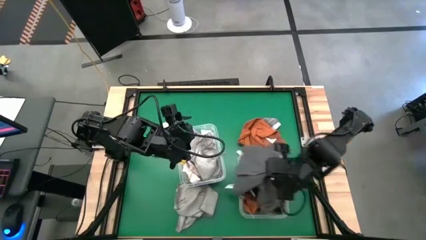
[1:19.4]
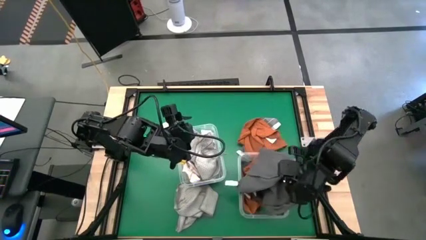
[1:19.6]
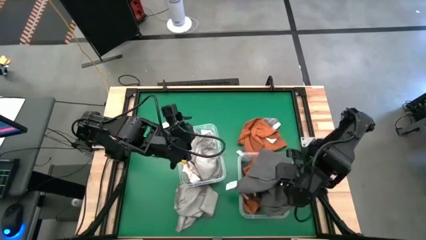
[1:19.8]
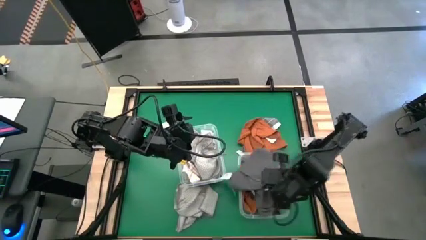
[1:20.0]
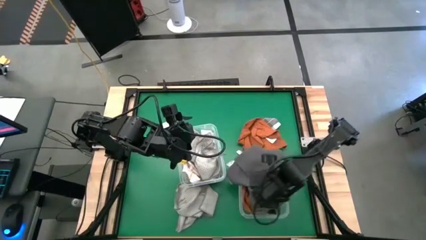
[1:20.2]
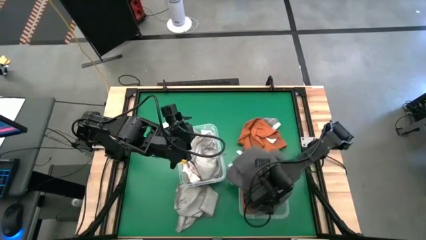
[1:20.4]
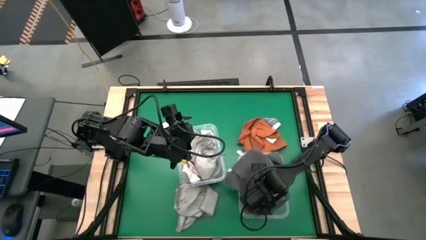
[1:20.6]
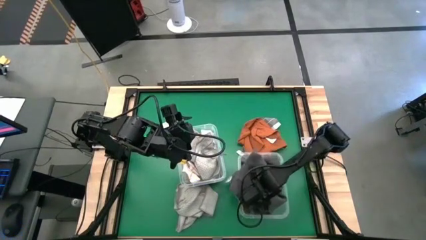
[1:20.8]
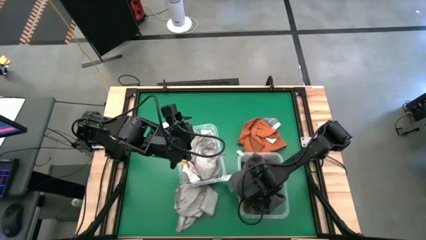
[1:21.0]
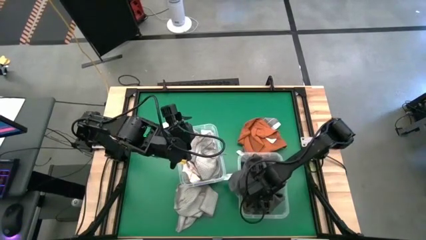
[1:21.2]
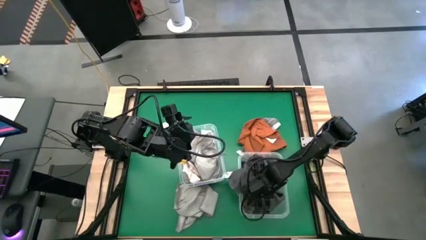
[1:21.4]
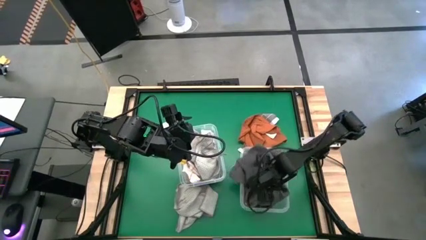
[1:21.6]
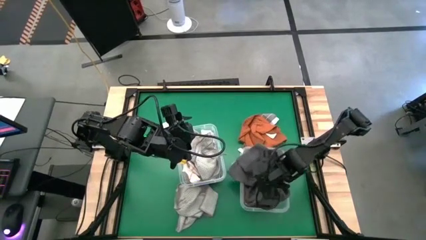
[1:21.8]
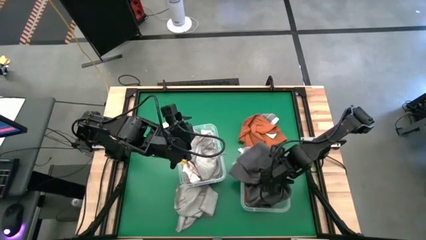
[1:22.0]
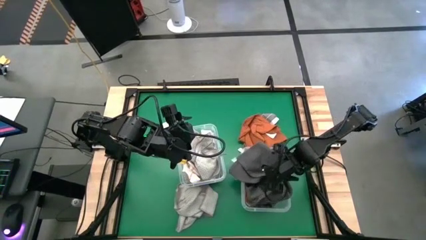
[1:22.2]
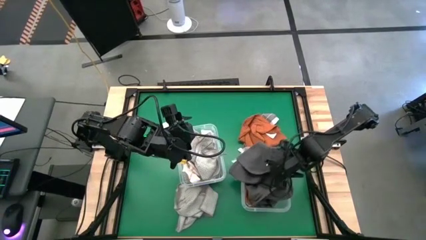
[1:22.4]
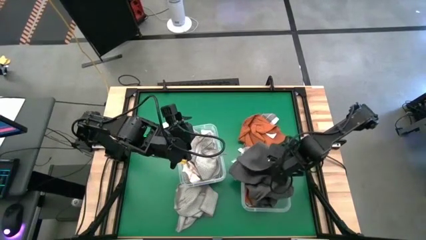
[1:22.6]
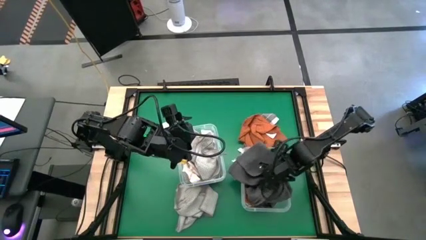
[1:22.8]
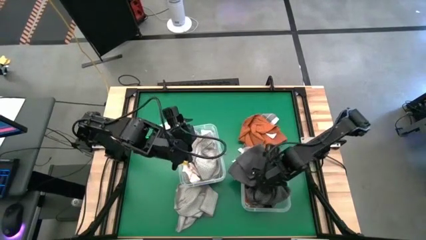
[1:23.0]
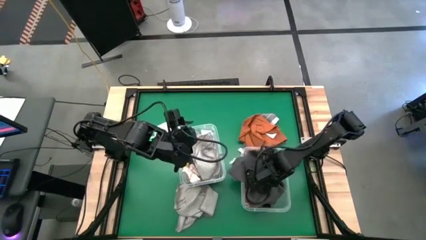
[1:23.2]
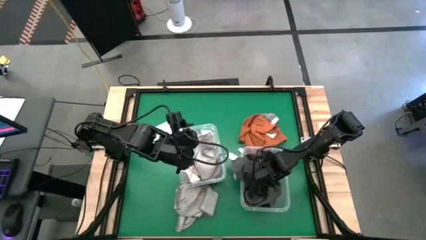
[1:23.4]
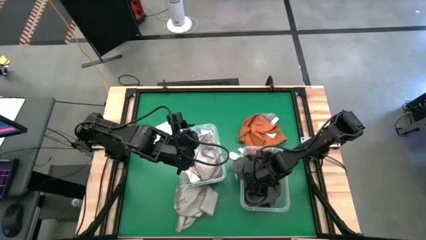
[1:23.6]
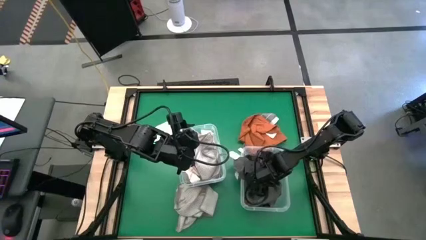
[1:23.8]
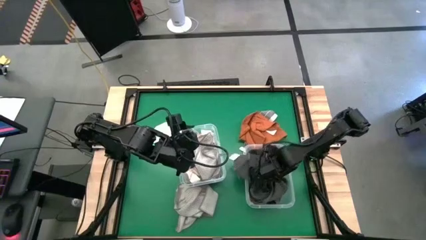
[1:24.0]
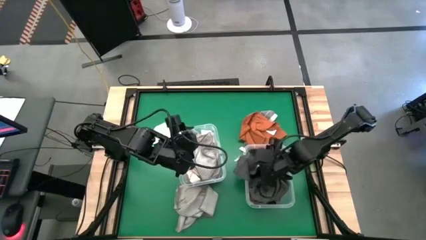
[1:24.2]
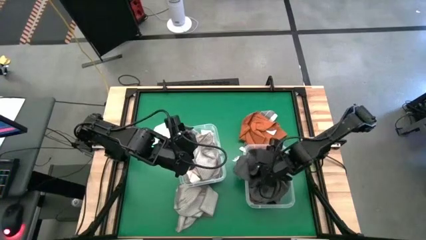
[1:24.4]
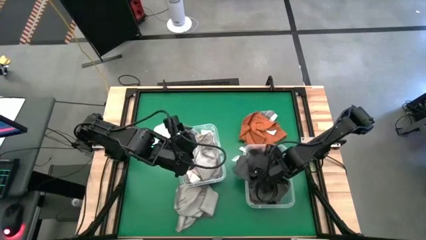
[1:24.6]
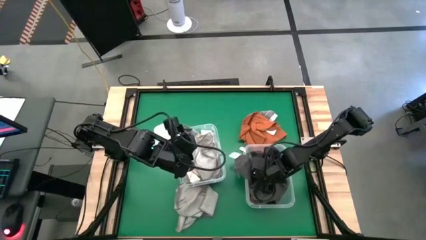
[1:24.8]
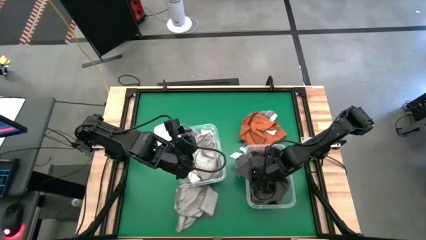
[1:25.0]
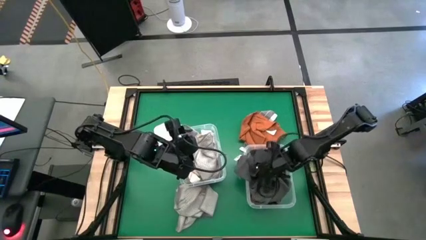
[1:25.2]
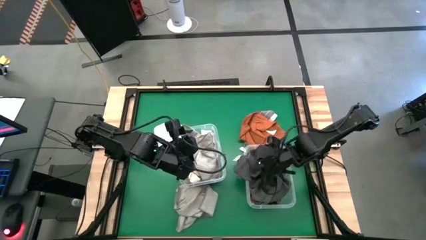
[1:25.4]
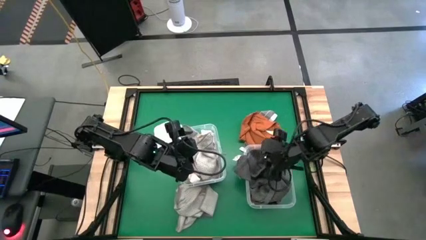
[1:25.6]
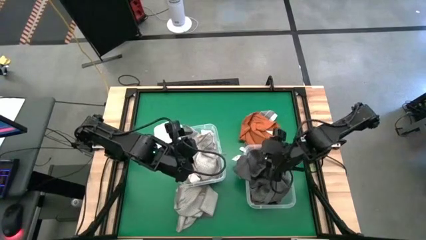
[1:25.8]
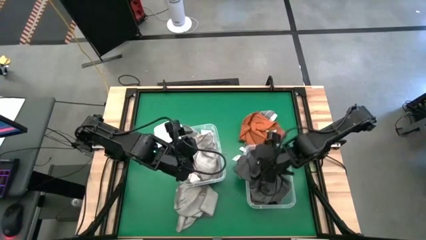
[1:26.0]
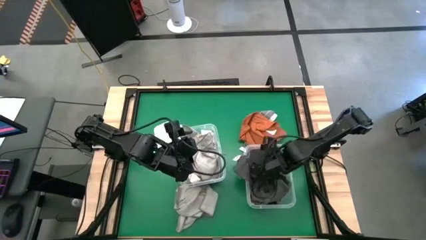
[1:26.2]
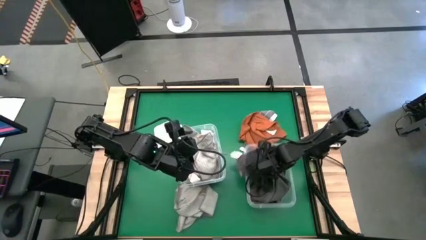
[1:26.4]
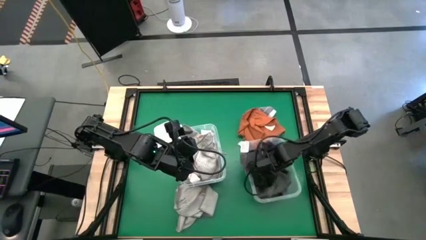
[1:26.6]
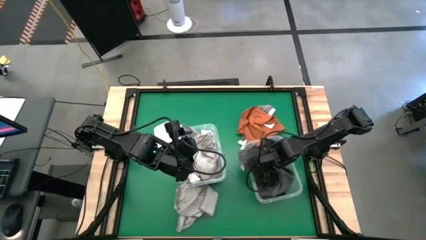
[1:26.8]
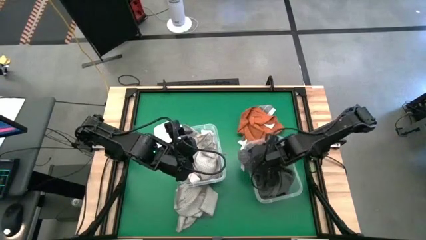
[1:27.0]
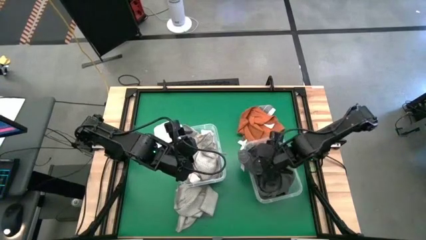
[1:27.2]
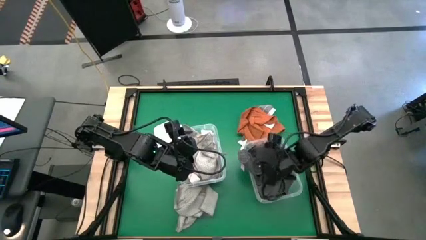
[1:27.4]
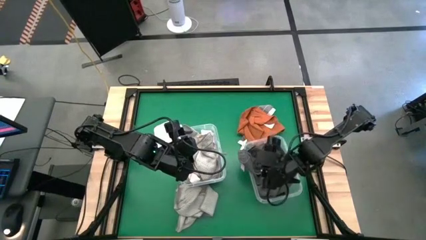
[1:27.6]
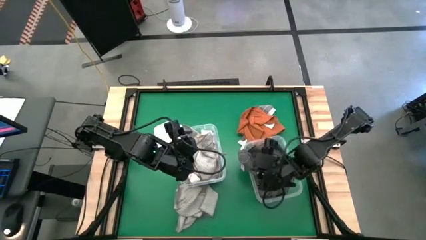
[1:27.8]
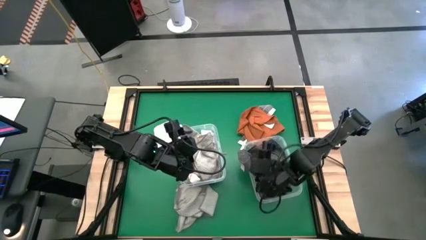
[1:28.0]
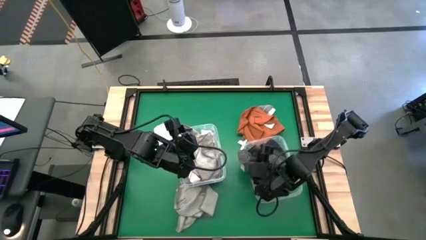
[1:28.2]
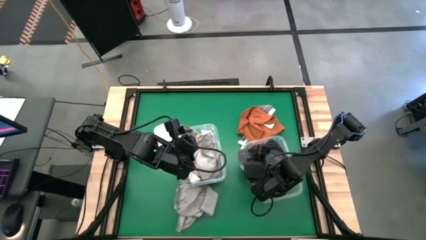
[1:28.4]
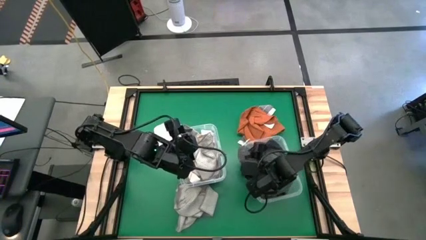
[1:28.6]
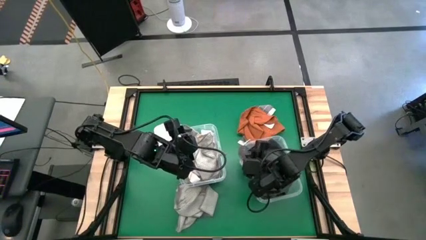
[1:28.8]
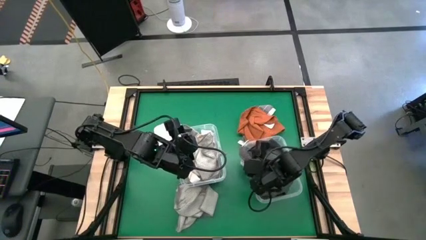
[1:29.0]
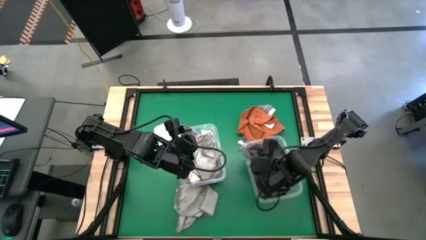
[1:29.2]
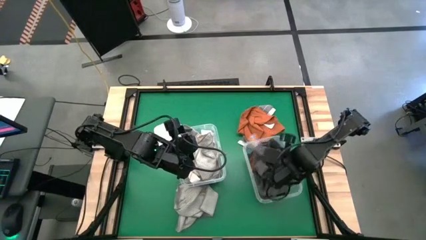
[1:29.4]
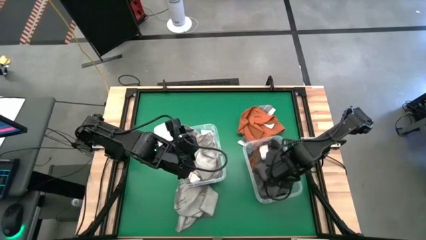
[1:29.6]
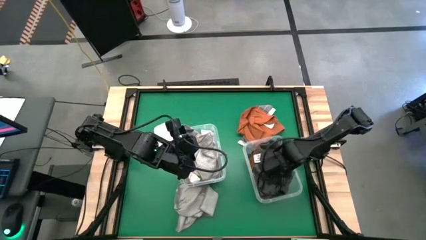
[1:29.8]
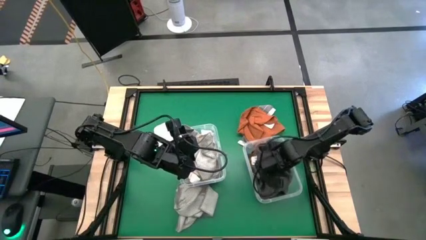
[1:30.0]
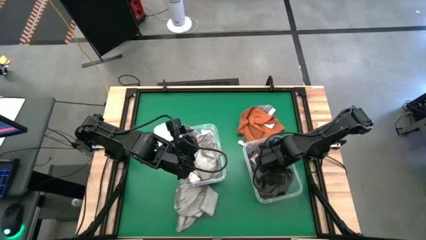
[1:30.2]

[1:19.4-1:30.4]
Task: Sort microfiber towel by color & place in baskets
Put the grey microfiber towel into the right transparent bin
